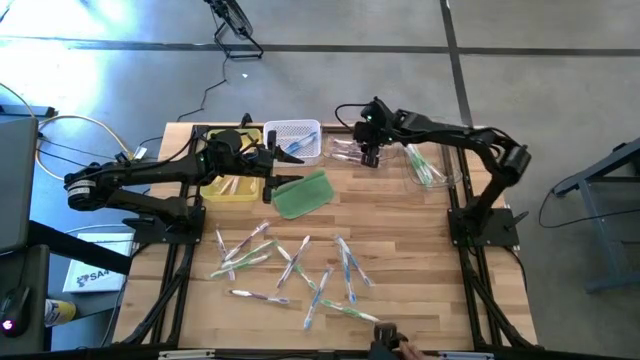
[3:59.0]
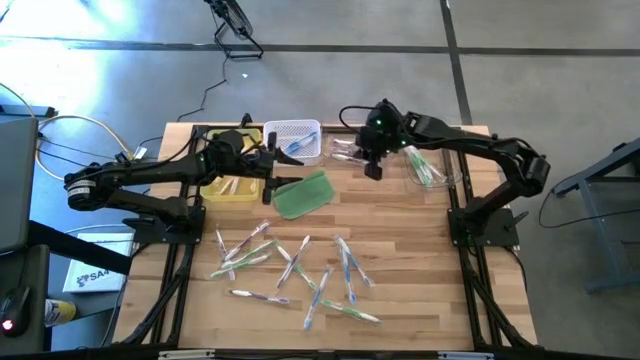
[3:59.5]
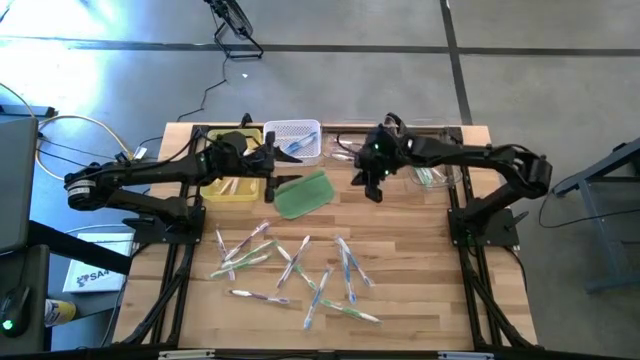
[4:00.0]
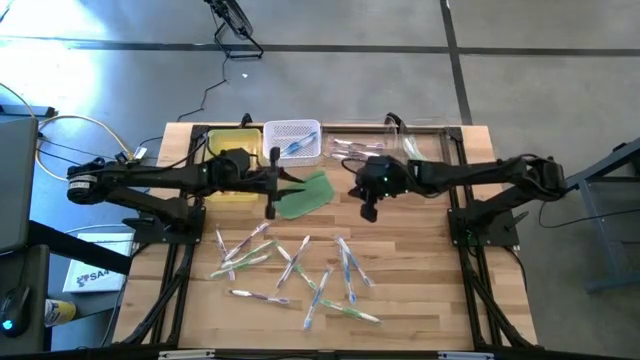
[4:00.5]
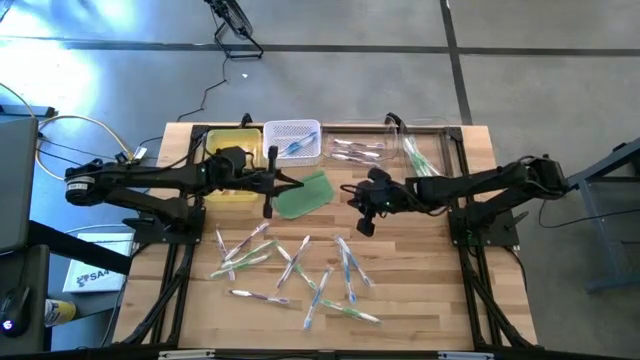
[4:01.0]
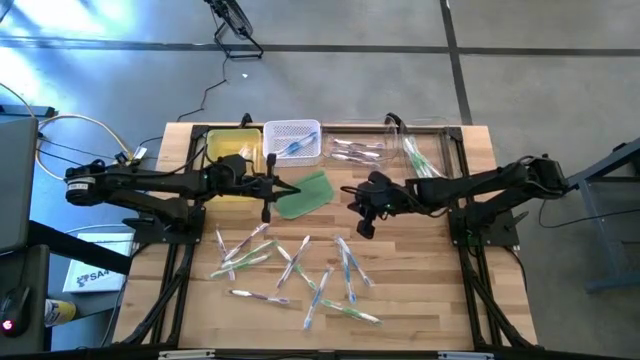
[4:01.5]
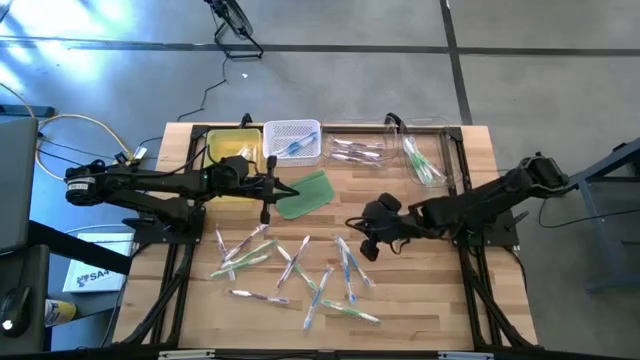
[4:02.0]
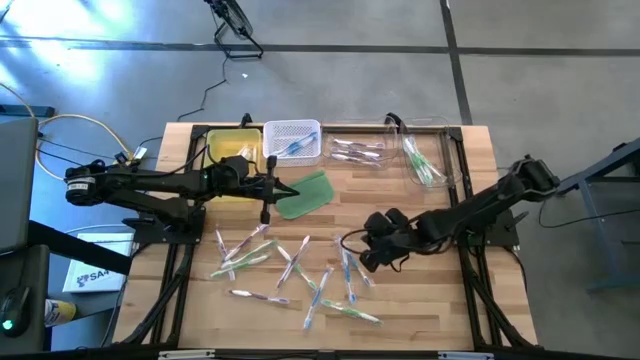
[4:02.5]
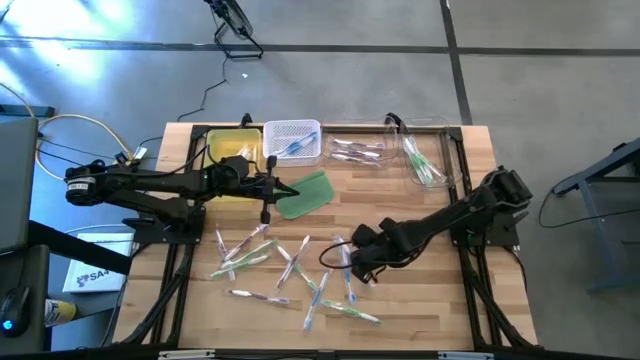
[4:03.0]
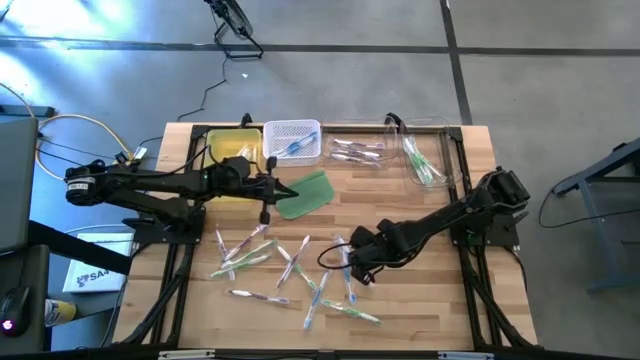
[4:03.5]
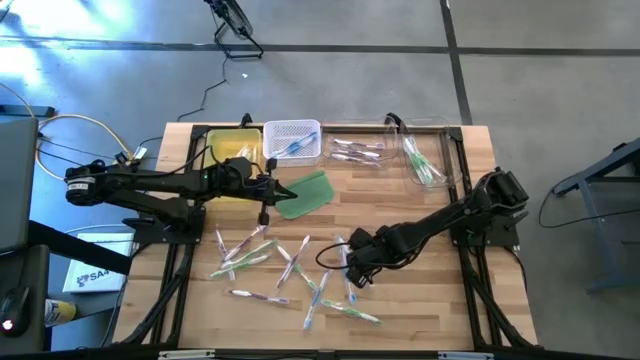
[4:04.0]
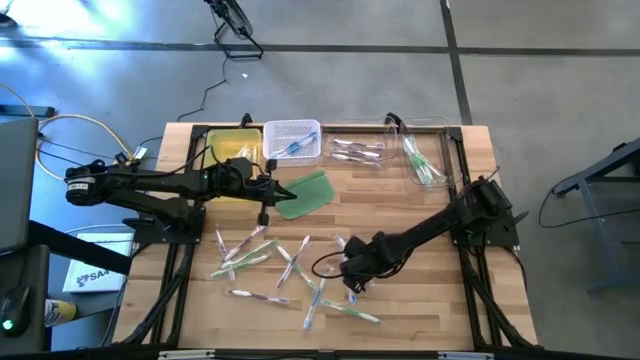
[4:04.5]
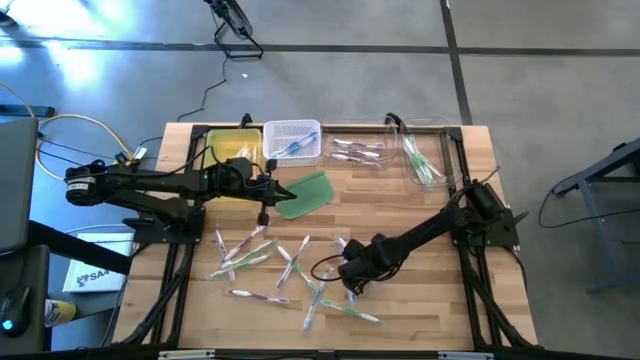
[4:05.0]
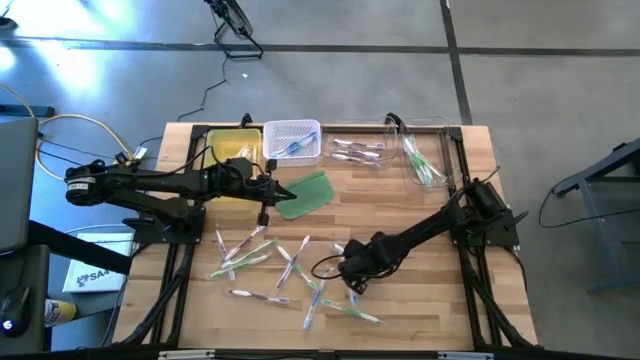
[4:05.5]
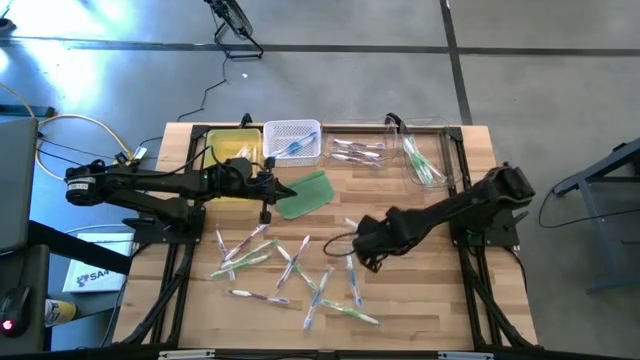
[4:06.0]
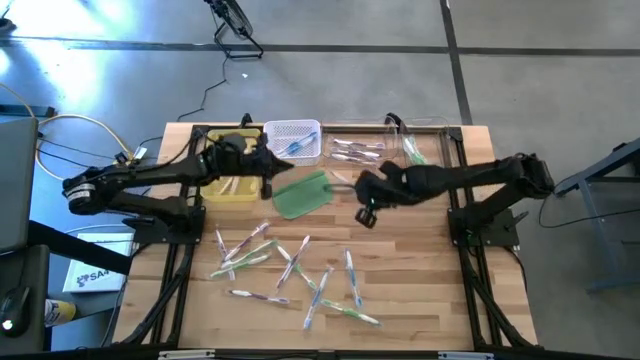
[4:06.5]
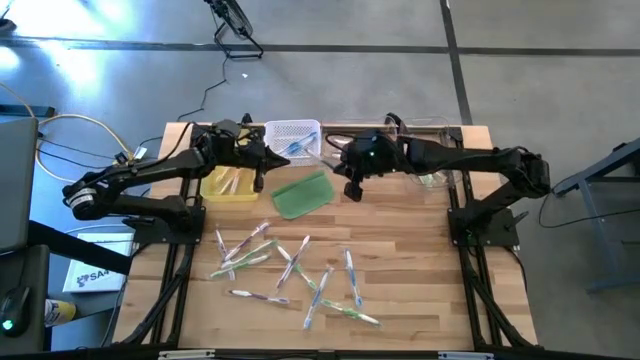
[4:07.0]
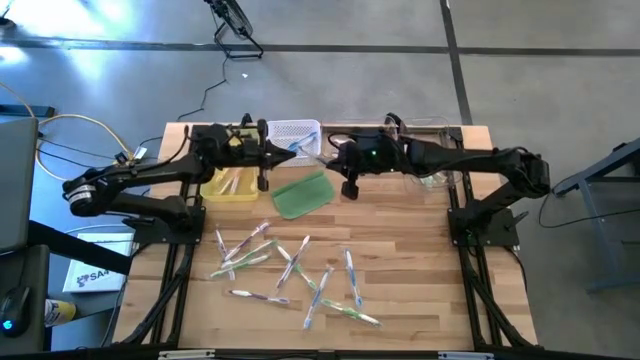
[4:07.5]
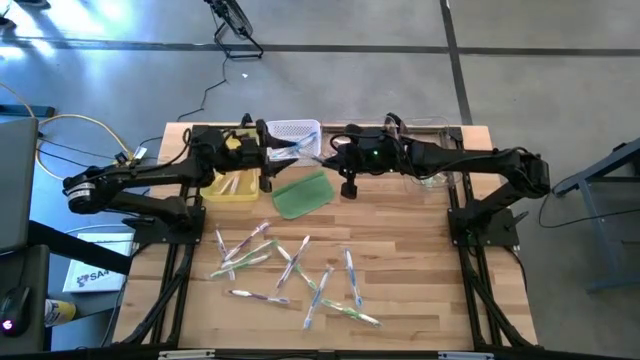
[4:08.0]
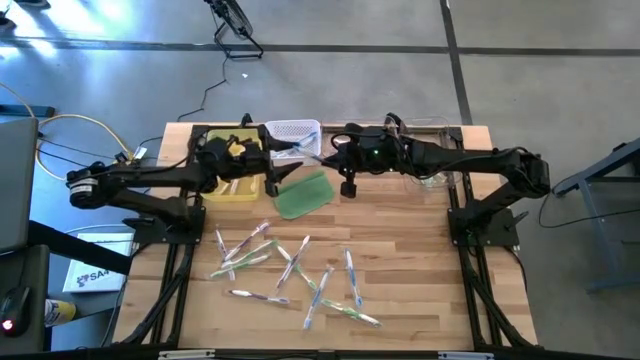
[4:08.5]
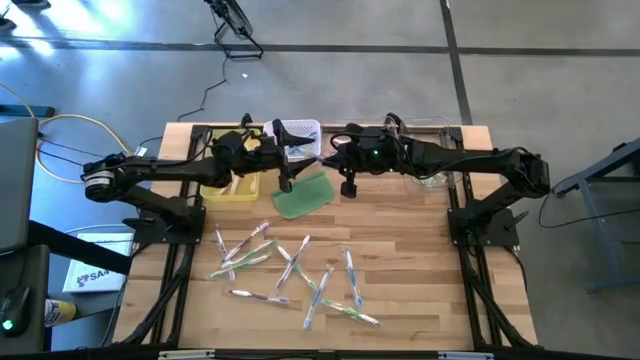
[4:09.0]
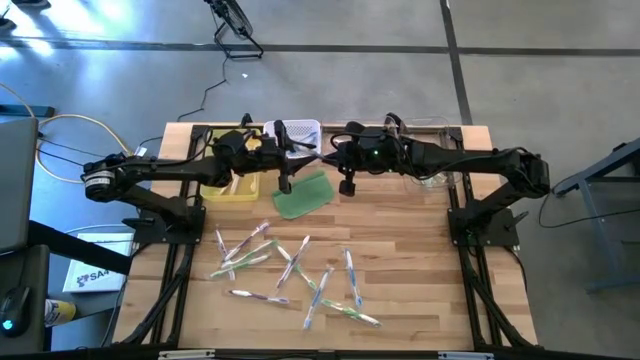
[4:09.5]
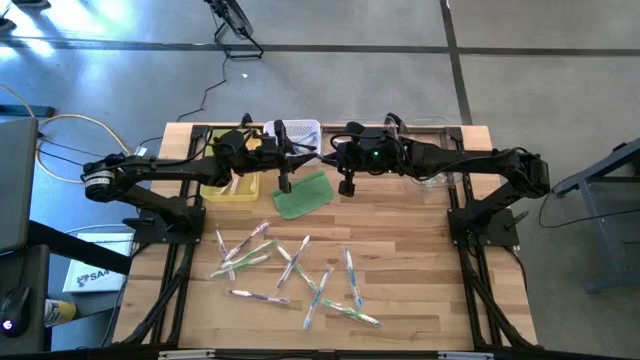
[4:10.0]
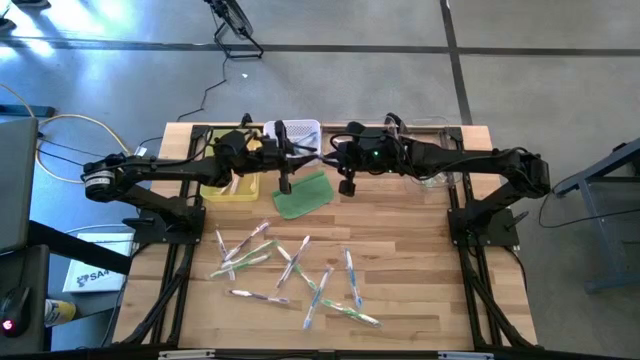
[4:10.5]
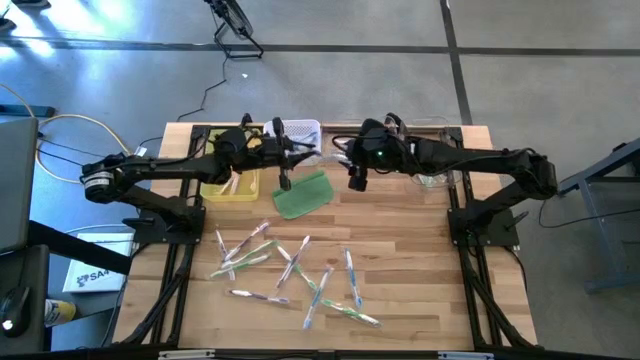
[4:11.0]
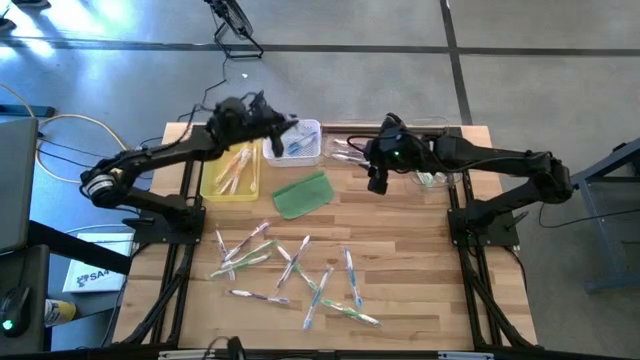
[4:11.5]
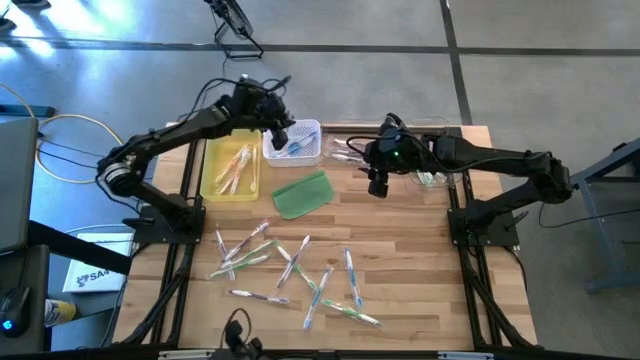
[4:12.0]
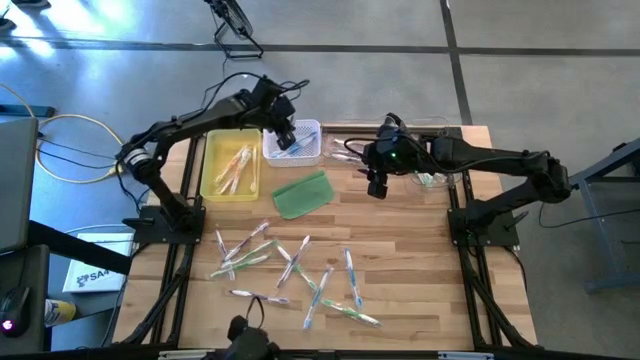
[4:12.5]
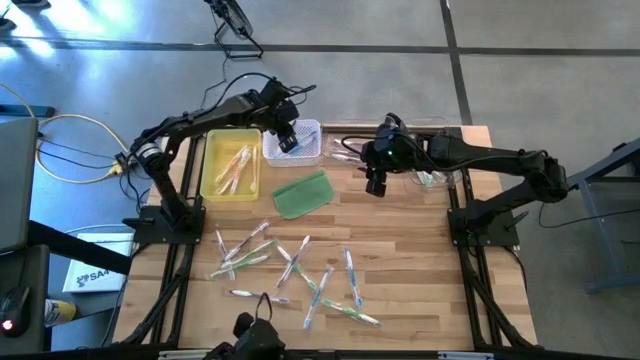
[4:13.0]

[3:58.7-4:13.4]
Task: Pick & Place Toothbrushes
Put the blue toothbrush into the white bin

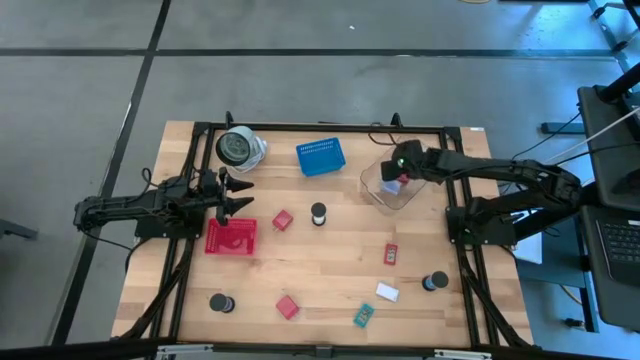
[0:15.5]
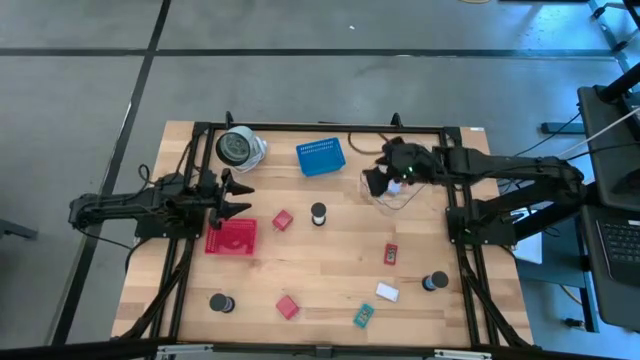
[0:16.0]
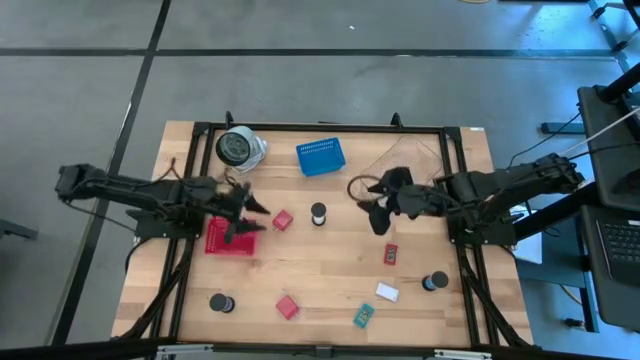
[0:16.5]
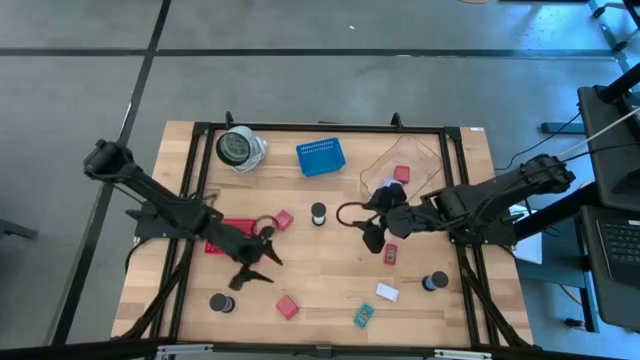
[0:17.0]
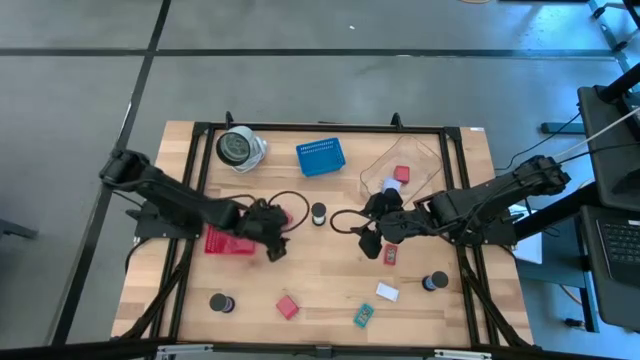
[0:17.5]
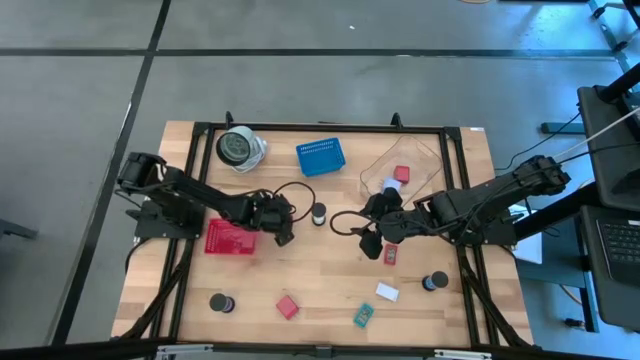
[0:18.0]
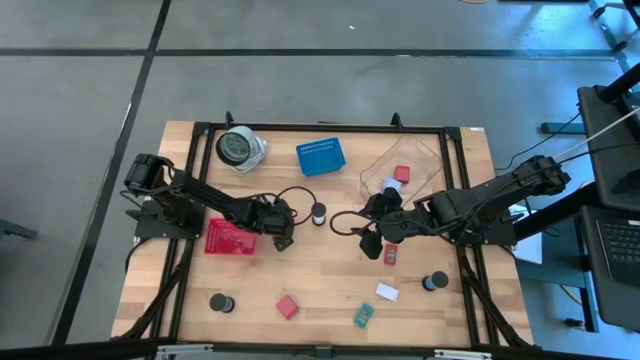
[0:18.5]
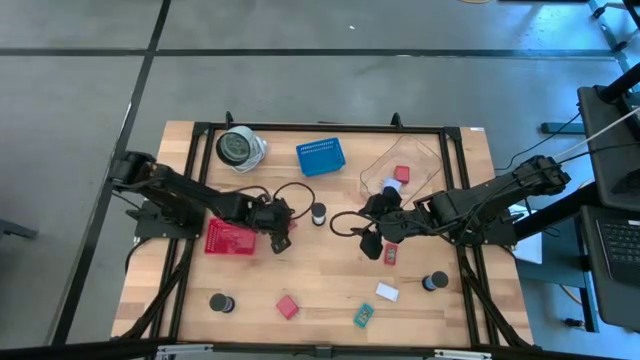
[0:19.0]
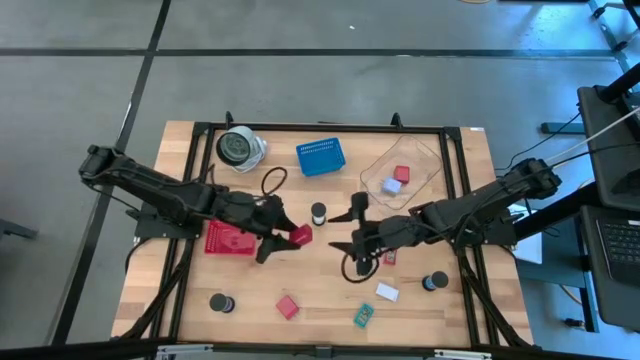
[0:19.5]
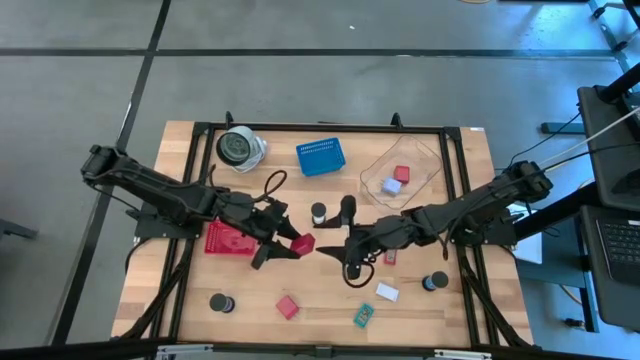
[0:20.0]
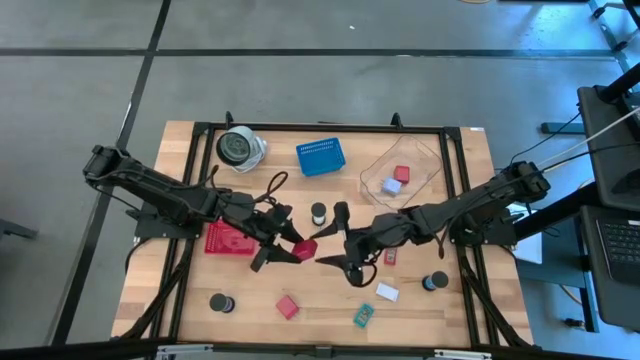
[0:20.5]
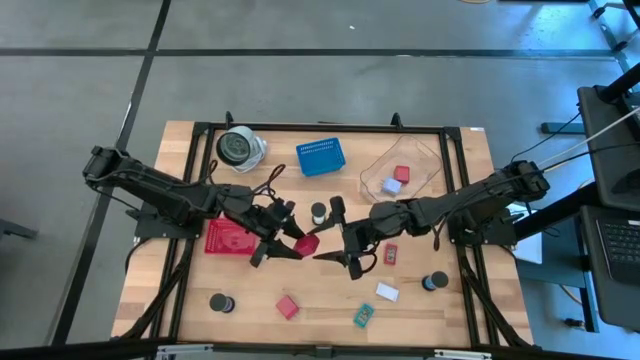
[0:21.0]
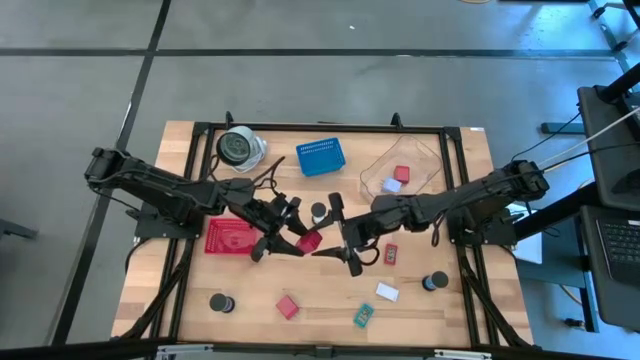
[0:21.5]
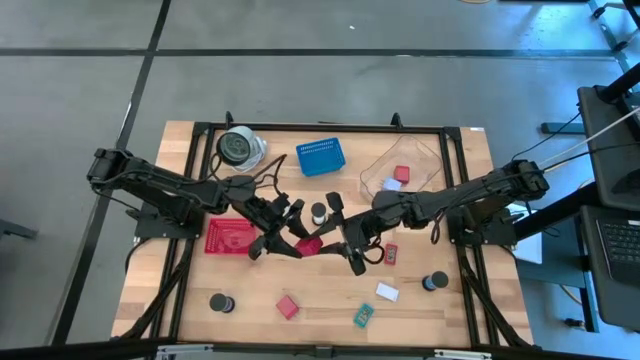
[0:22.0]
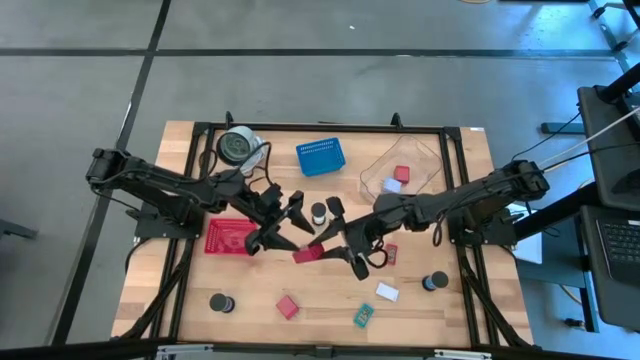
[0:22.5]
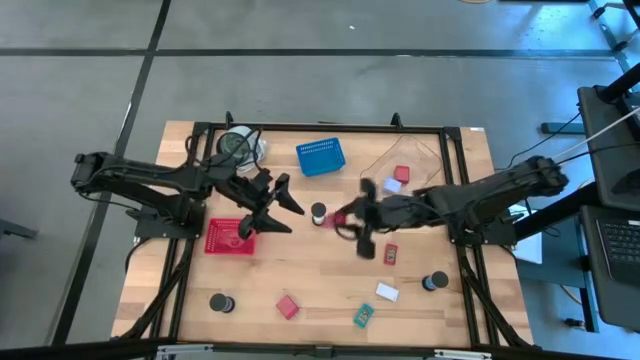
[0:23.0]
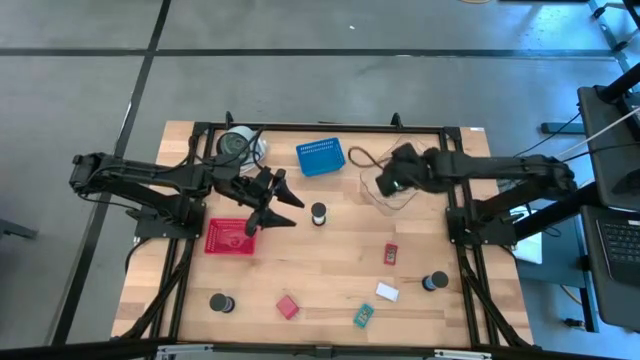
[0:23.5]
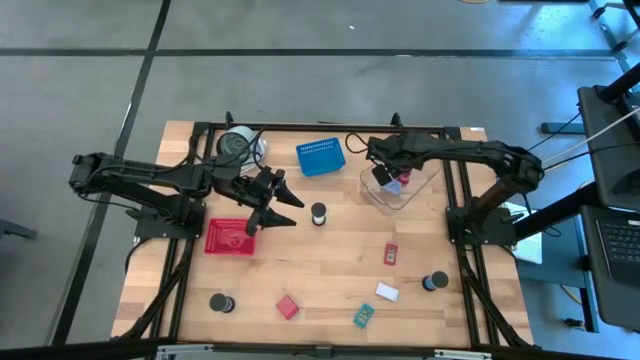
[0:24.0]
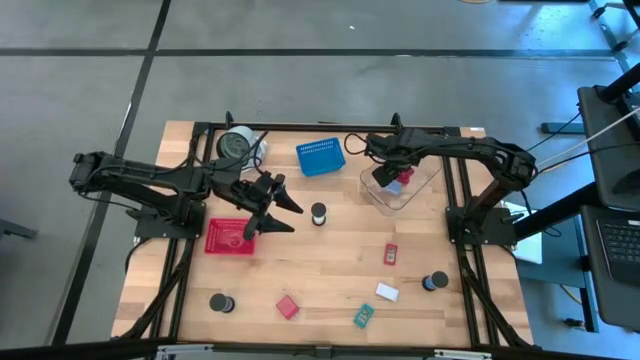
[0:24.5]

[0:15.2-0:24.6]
Task: Pick & Place Office items
Put the top-left red charger adapter into the transparent bin
